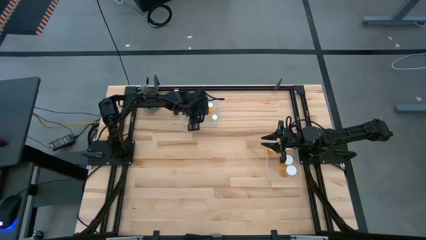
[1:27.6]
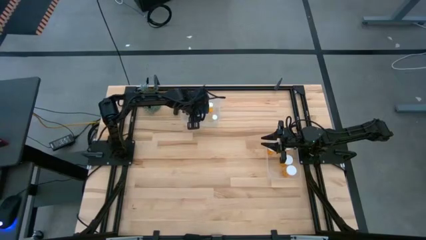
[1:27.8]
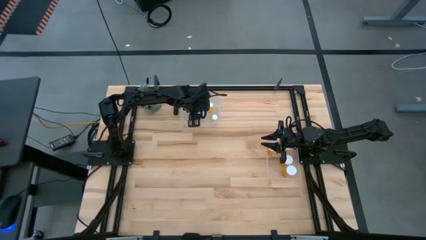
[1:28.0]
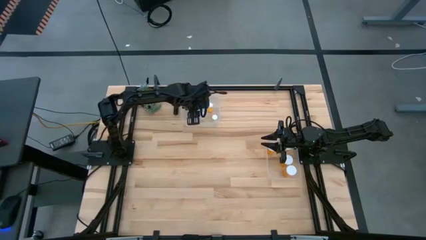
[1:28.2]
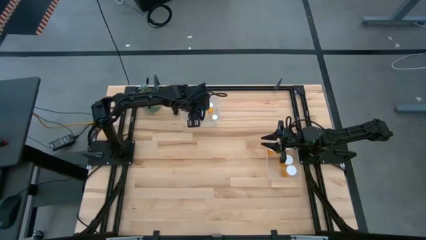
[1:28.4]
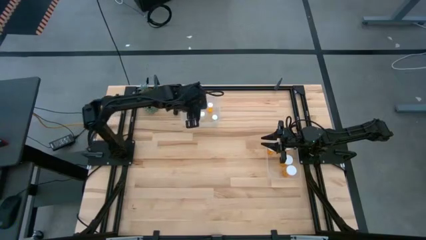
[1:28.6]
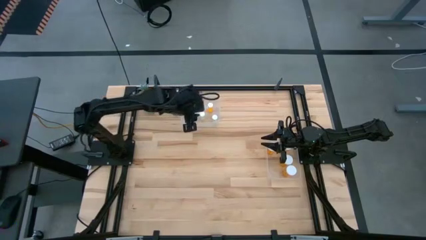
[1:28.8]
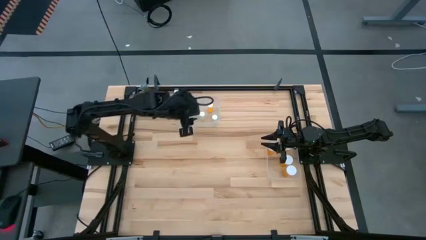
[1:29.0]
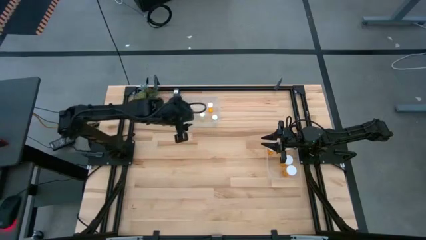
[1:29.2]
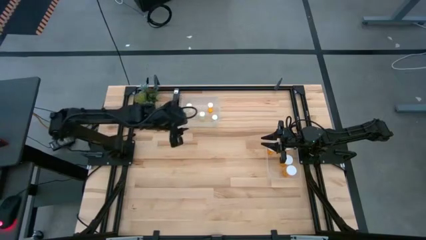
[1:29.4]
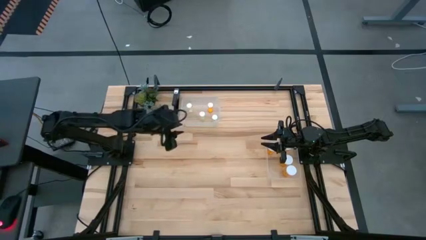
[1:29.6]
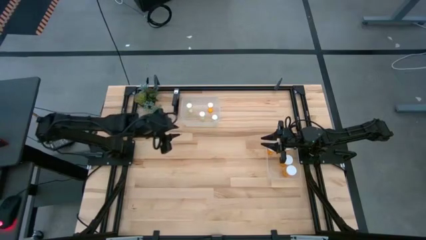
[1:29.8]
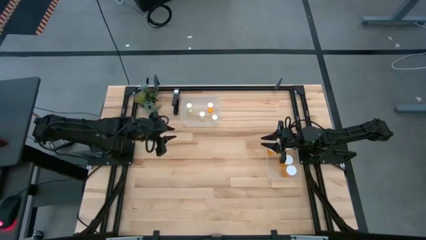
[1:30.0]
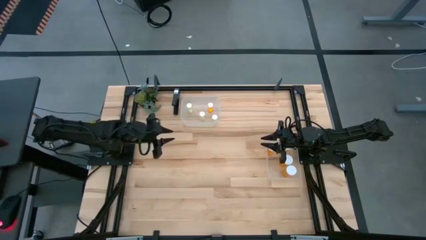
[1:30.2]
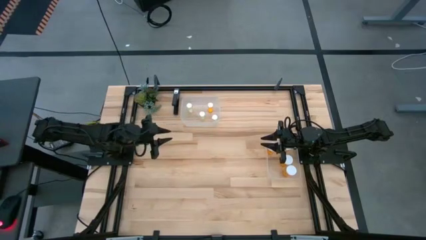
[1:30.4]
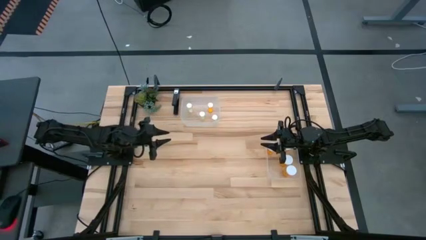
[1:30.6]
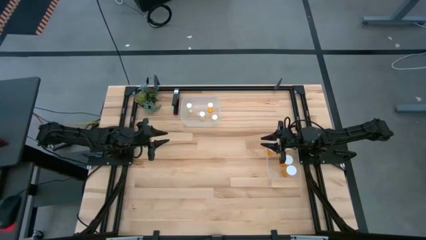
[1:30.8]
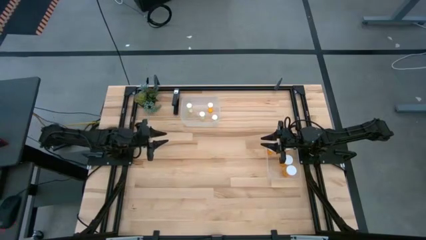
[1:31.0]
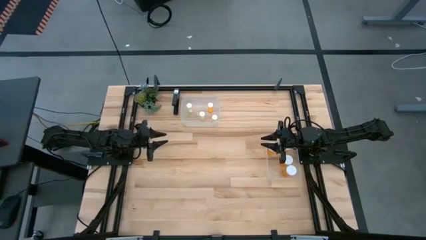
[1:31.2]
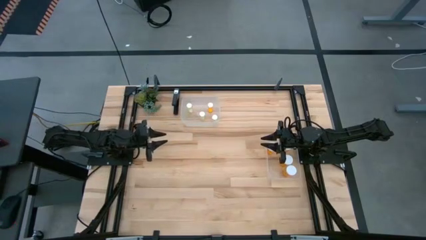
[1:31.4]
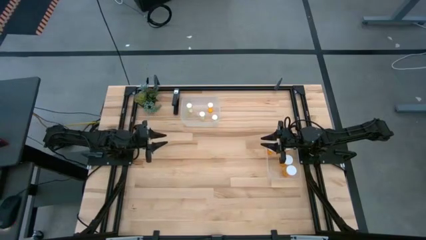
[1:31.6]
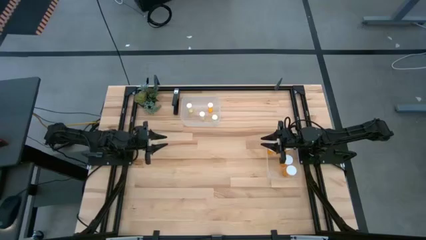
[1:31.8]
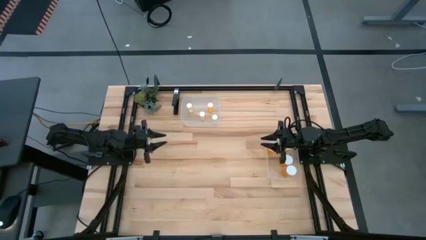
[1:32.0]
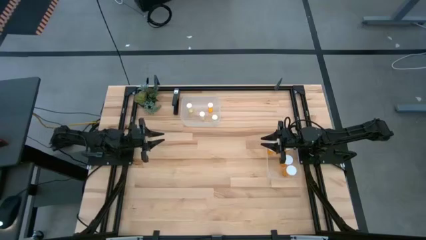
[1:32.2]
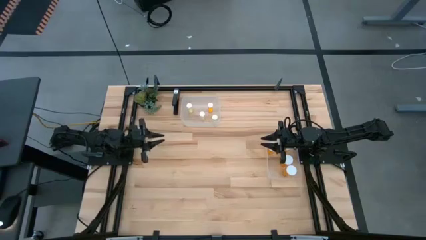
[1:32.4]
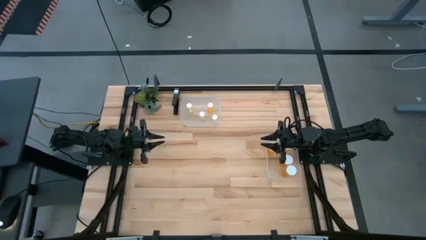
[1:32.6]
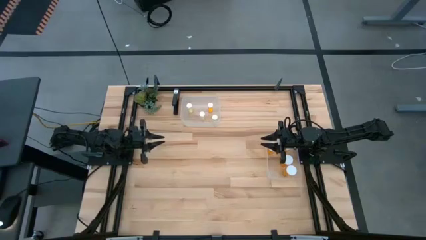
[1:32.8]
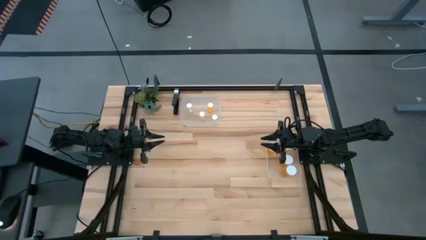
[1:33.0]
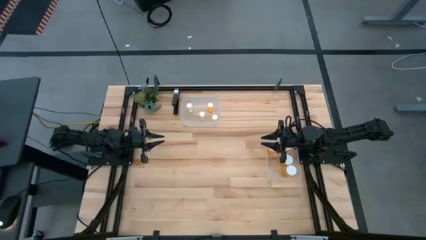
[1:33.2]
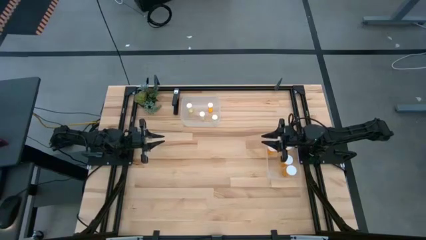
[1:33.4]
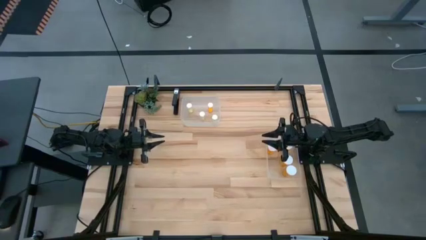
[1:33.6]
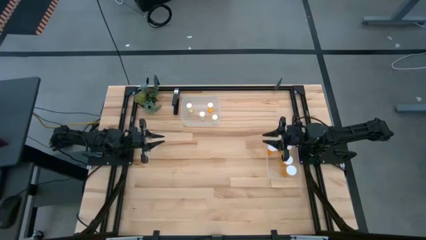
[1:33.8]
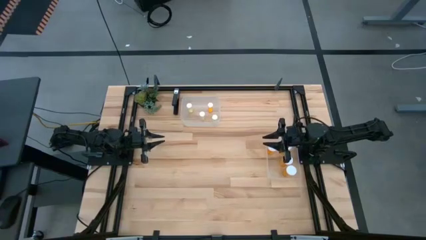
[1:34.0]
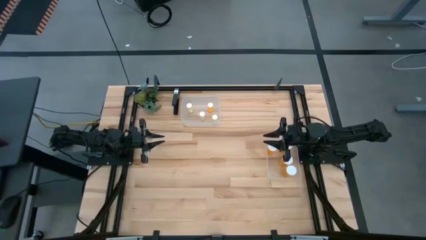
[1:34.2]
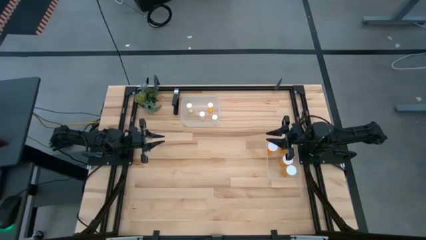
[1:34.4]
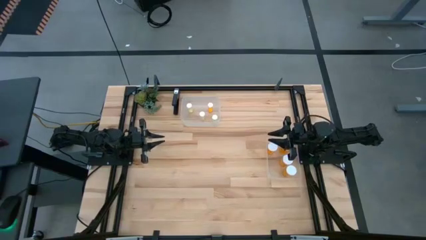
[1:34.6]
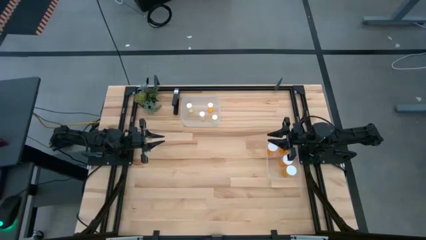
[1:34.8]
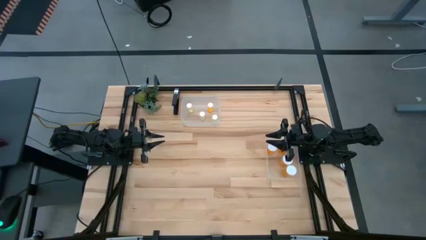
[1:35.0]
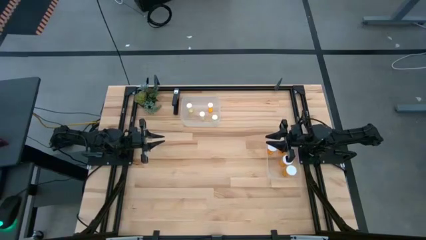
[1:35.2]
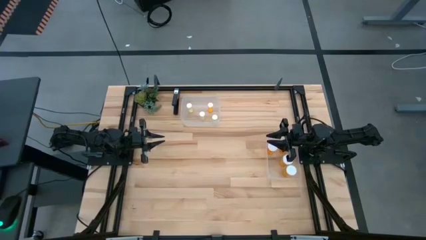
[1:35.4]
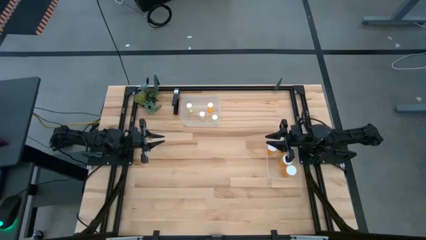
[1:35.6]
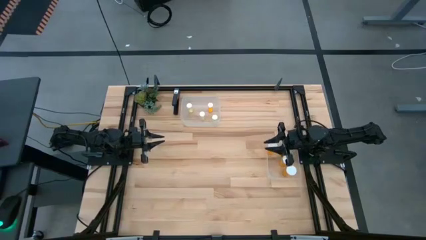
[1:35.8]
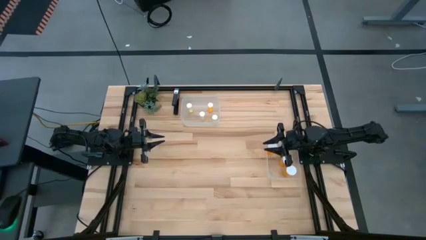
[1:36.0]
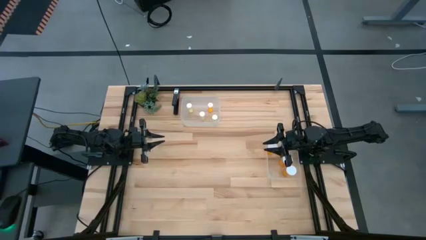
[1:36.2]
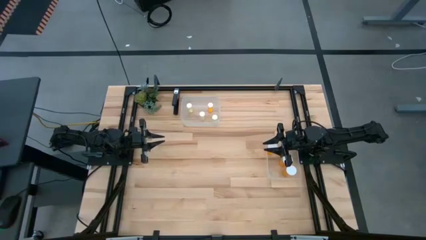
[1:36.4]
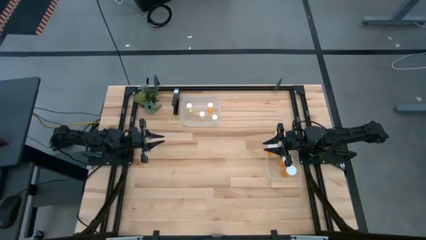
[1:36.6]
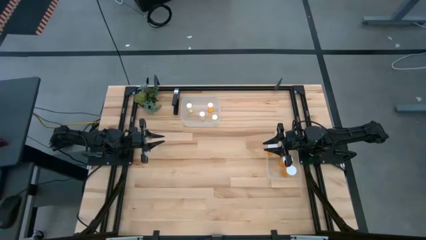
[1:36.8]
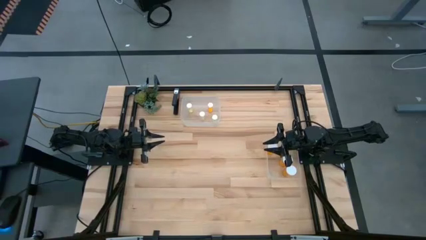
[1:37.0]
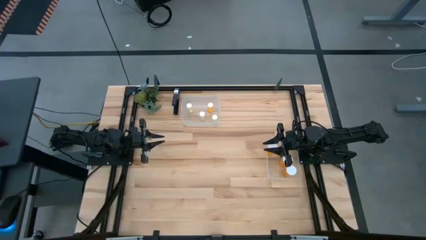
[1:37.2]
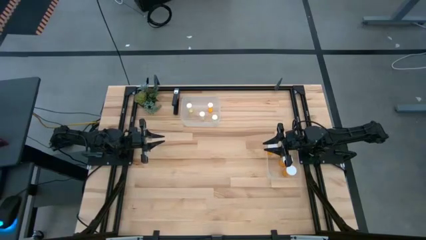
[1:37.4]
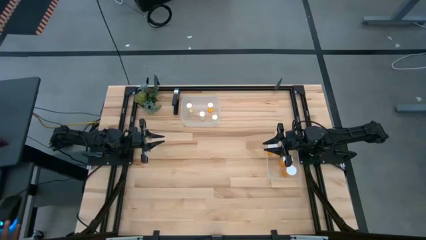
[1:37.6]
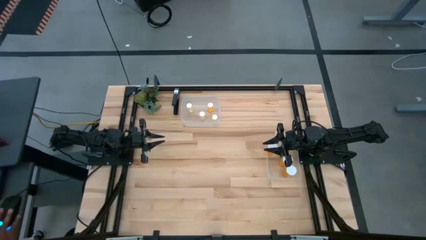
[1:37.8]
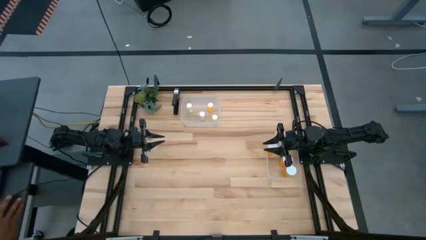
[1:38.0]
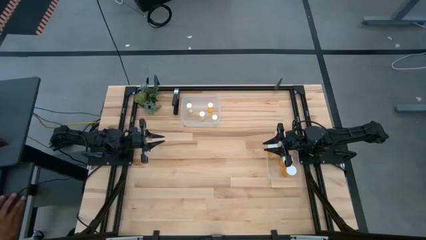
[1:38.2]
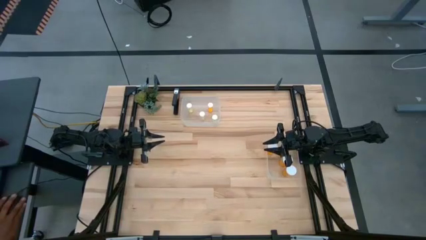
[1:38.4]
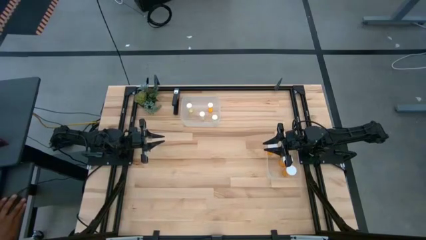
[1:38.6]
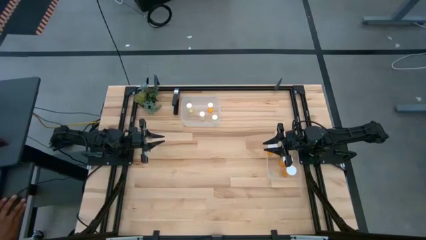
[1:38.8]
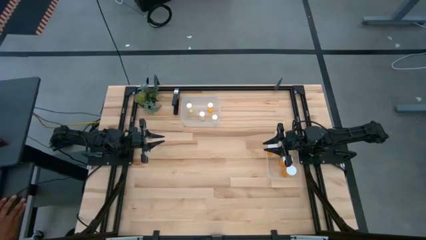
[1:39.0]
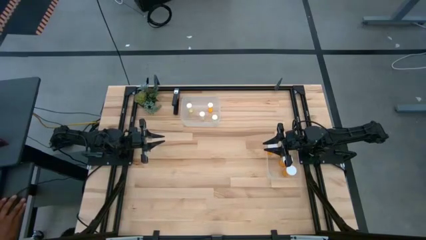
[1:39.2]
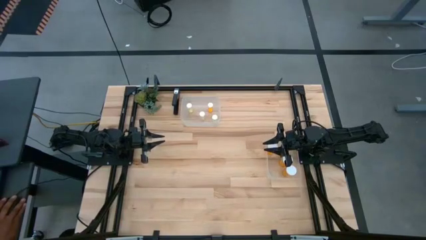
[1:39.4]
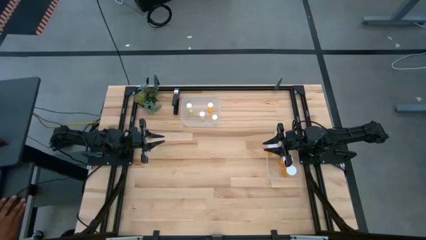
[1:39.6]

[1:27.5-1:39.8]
Task: Pick and place medicine bottles into bin by pill shape (circle, oval)
Return to Home Position
